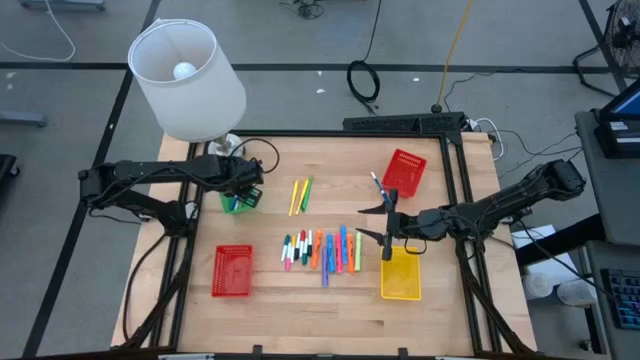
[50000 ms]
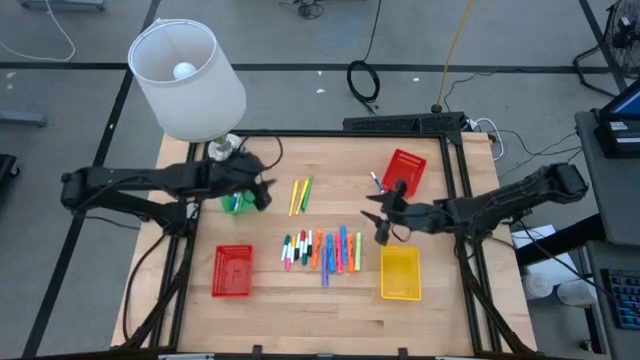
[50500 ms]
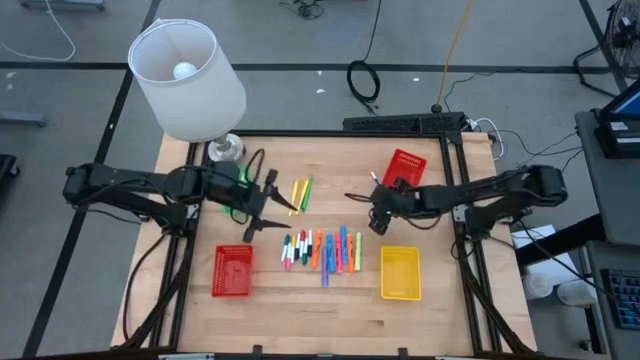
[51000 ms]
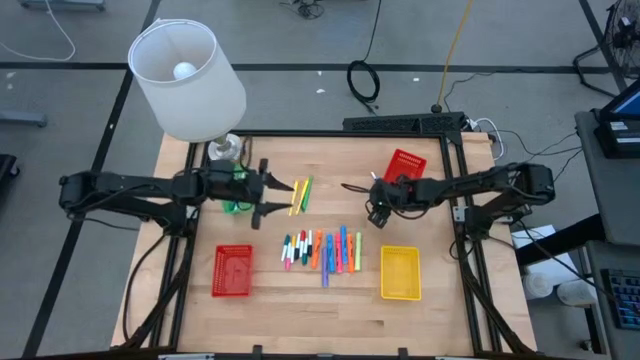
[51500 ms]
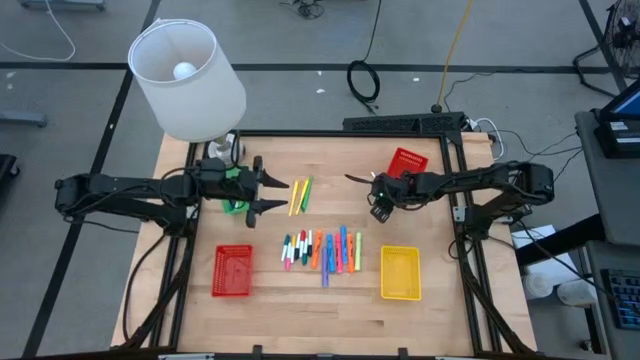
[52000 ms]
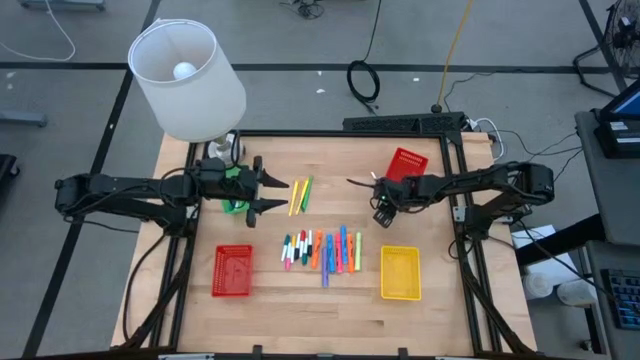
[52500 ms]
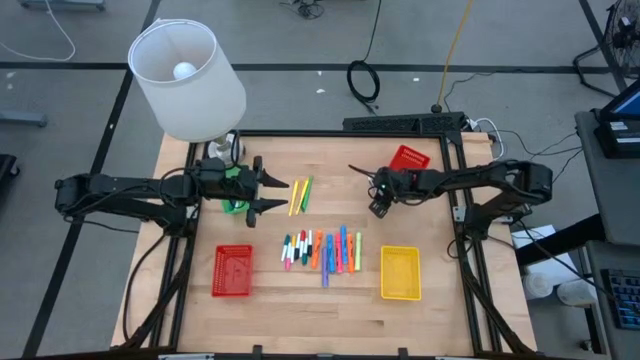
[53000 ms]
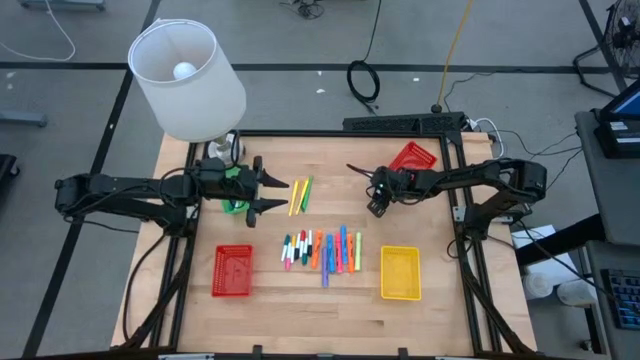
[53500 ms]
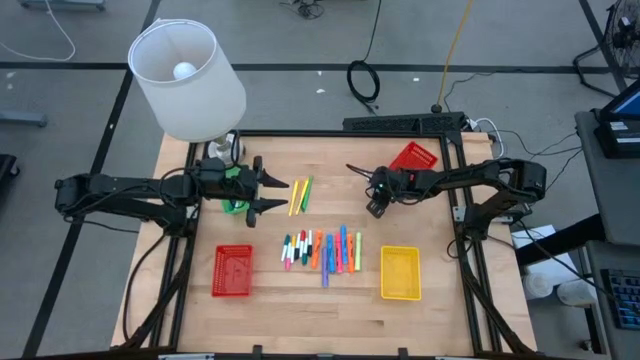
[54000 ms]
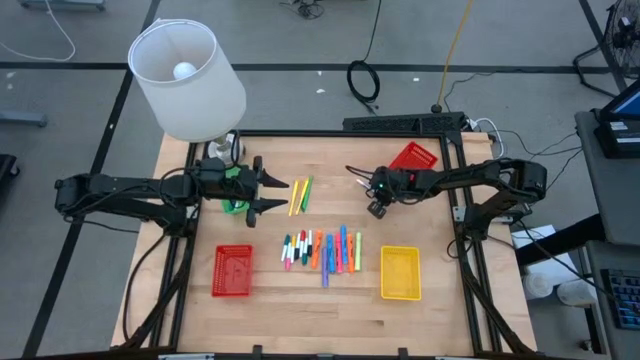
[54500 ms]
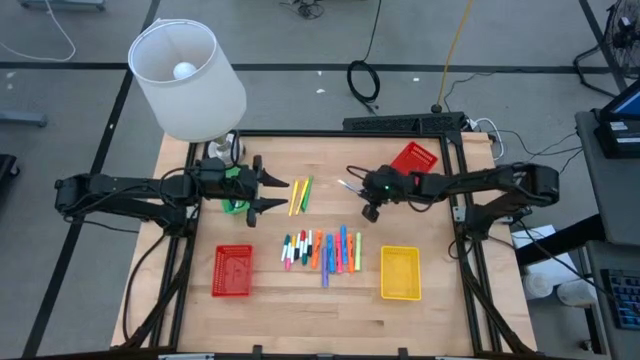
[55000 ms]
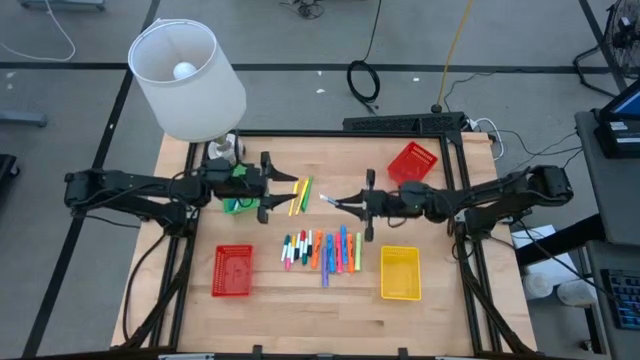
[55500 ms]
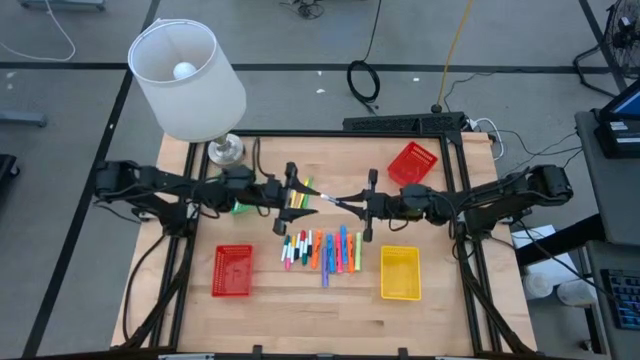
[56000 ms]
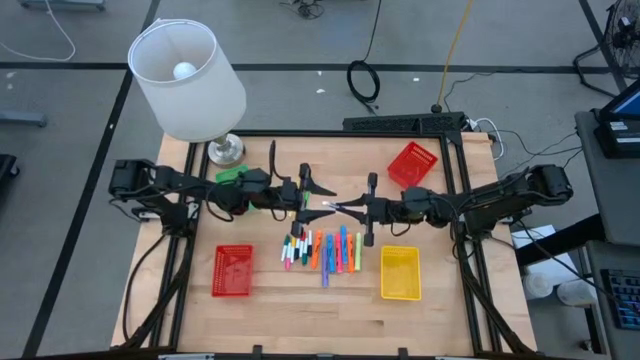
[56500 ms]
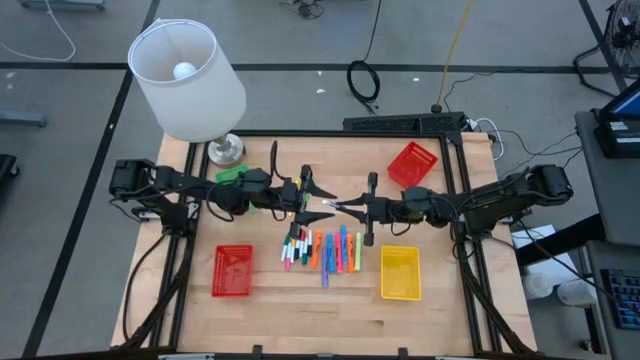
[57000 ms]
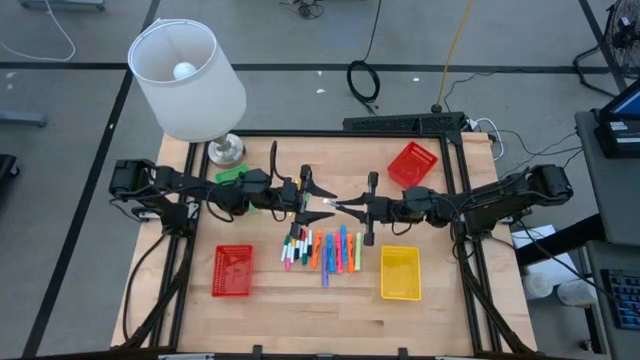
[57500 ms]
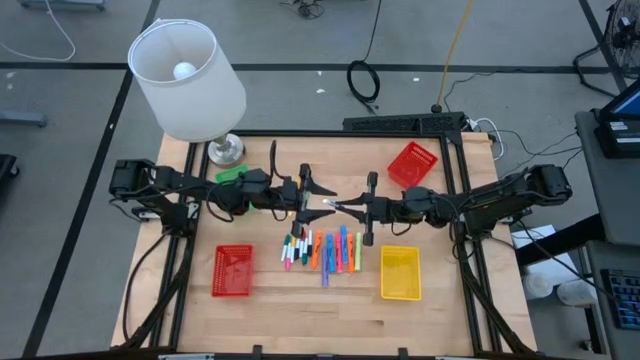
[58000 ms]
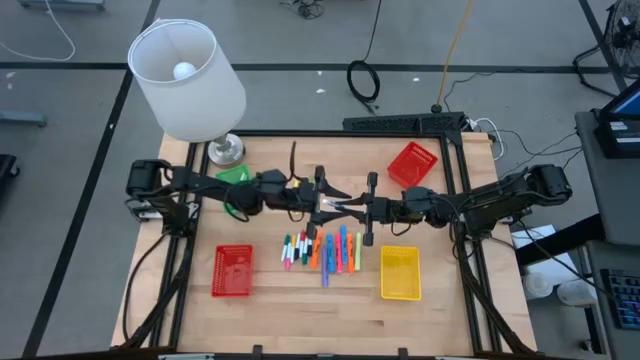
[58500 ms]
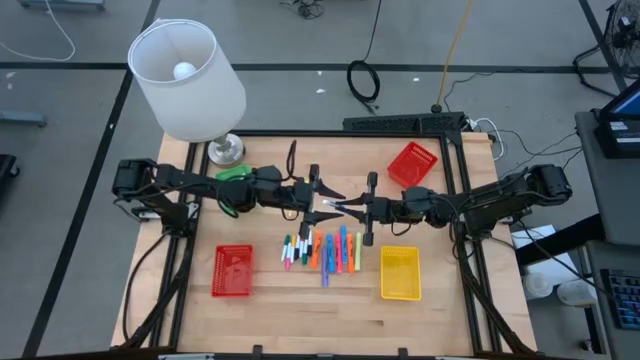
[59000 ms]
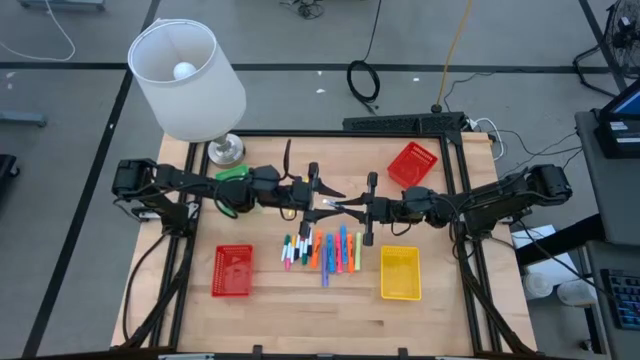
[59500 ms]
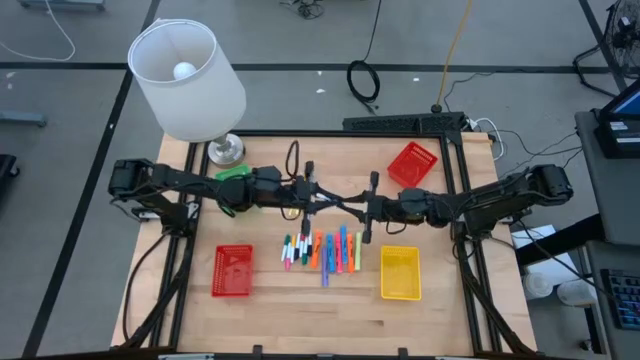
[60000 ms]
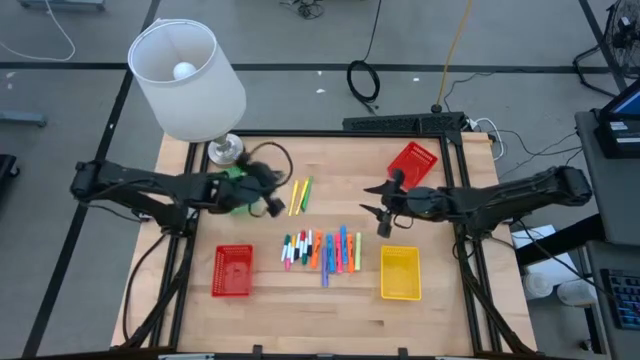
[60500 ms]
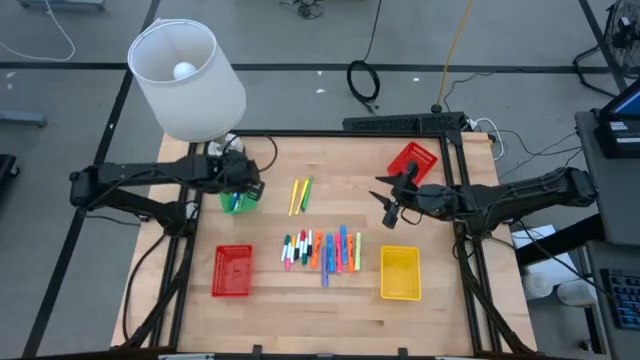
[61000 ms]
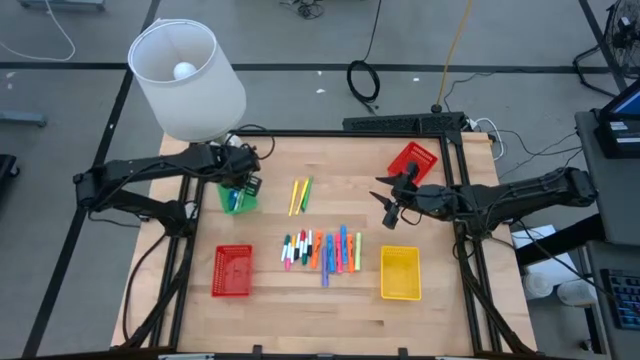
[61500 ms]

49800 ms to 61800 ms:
Task: Pick & Place Markers
Put the blue marker pen into the green basket

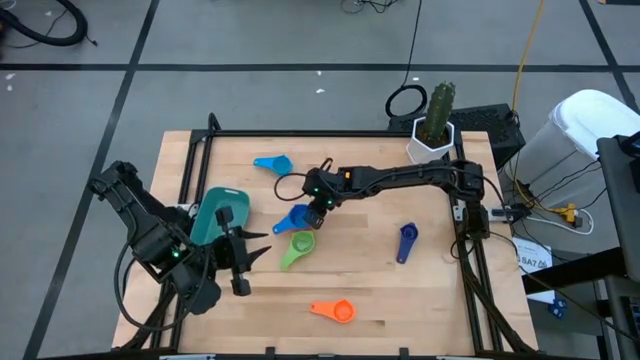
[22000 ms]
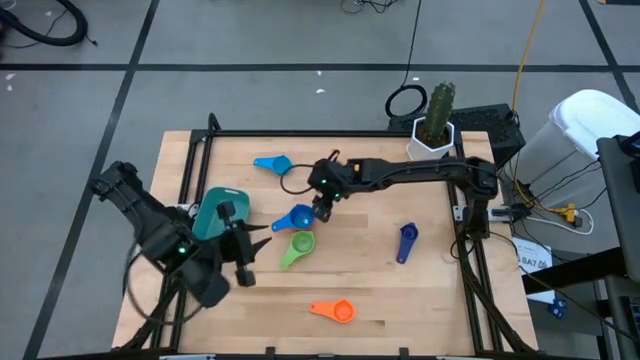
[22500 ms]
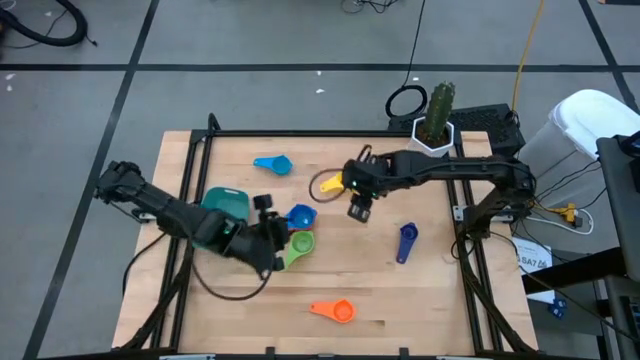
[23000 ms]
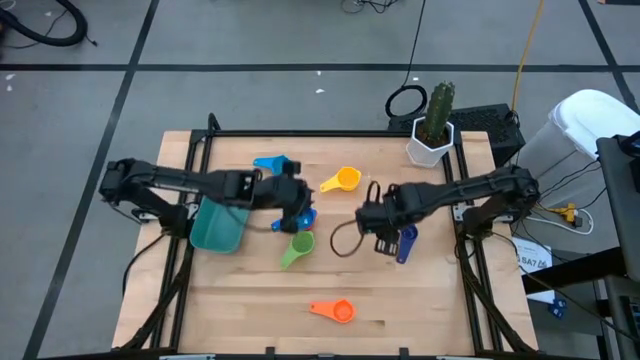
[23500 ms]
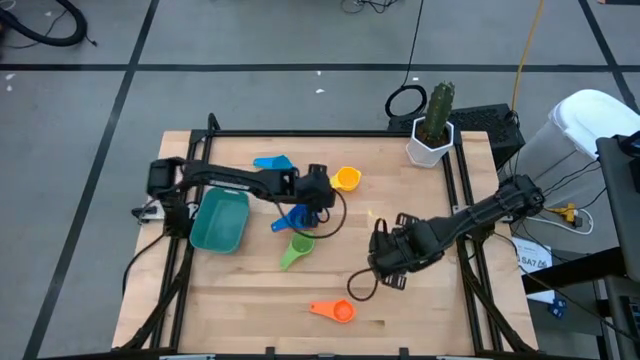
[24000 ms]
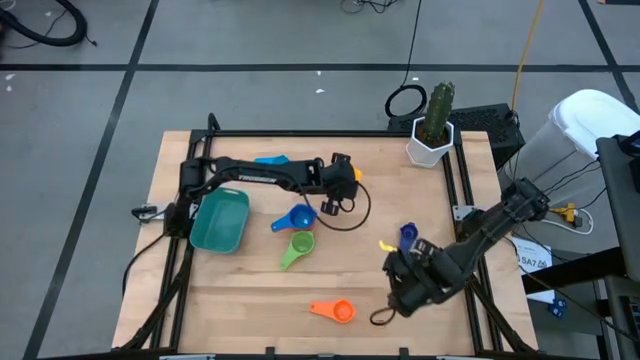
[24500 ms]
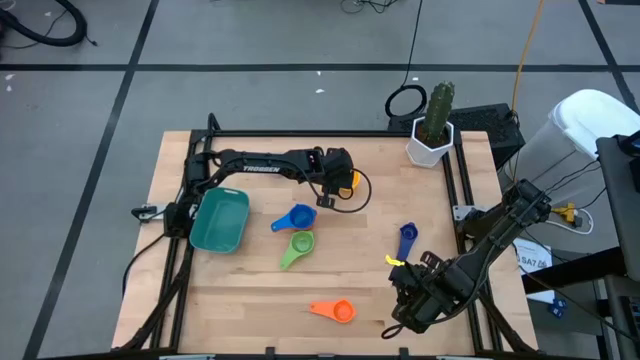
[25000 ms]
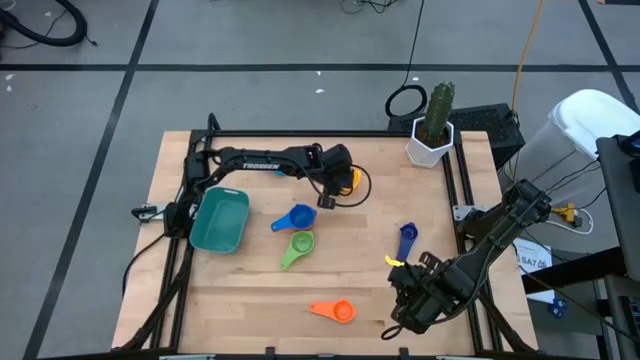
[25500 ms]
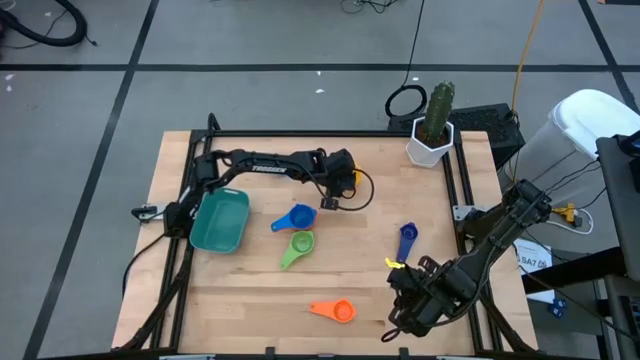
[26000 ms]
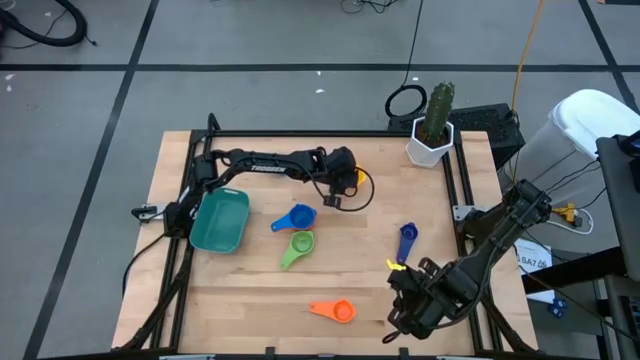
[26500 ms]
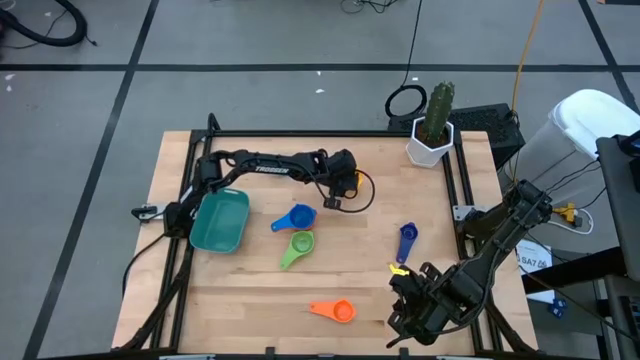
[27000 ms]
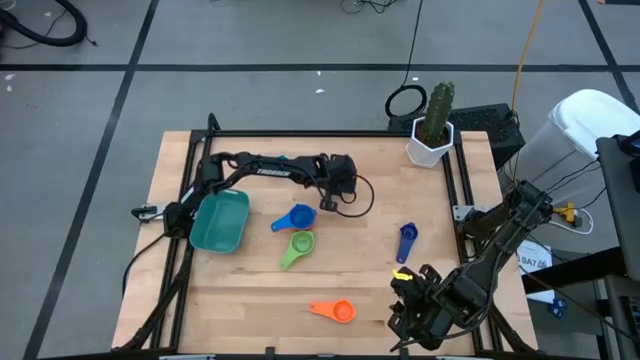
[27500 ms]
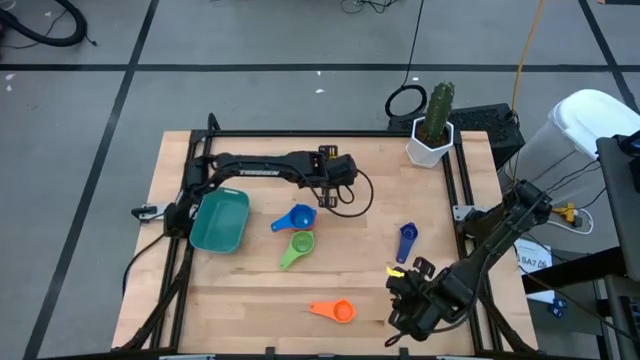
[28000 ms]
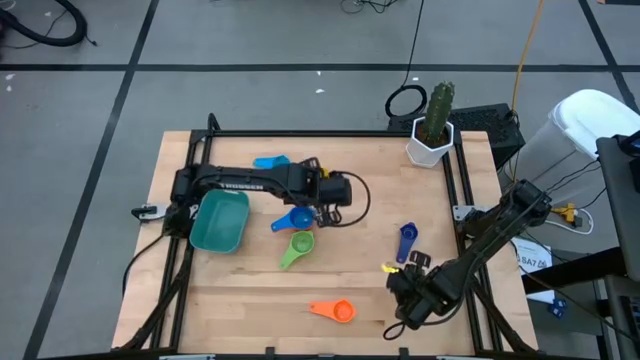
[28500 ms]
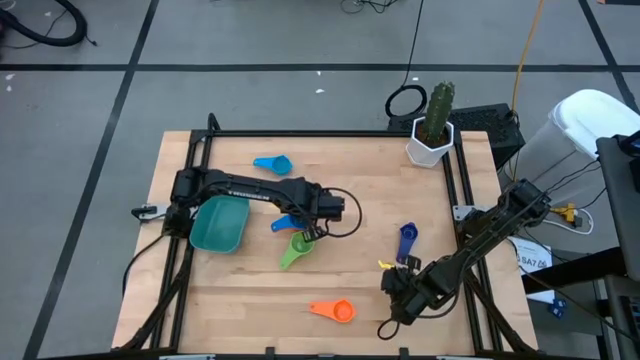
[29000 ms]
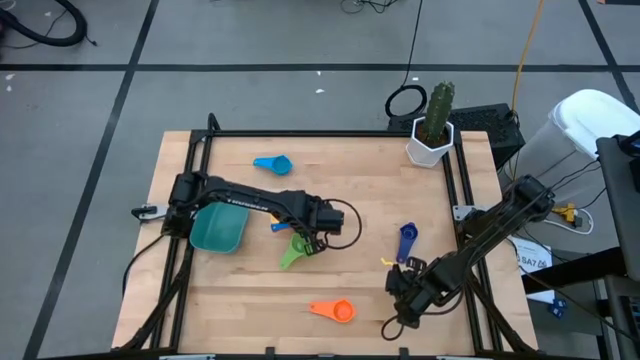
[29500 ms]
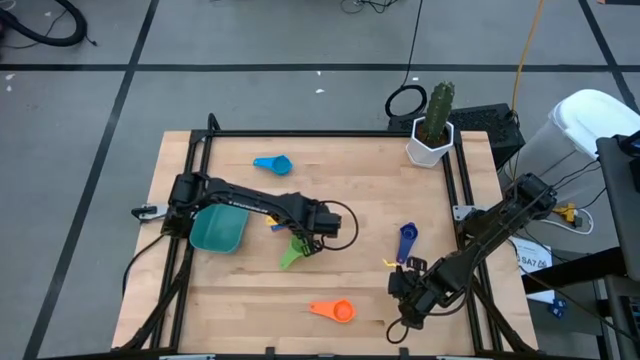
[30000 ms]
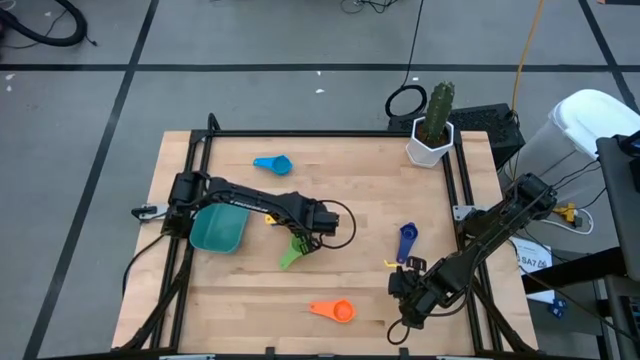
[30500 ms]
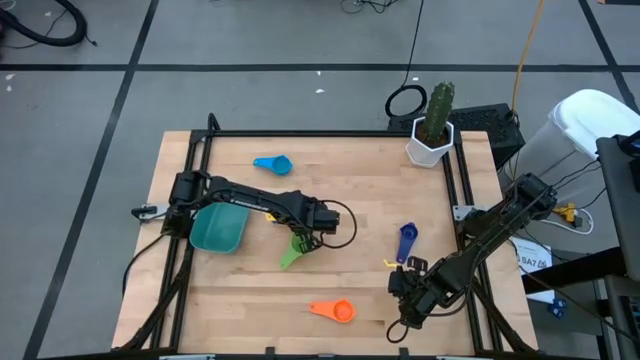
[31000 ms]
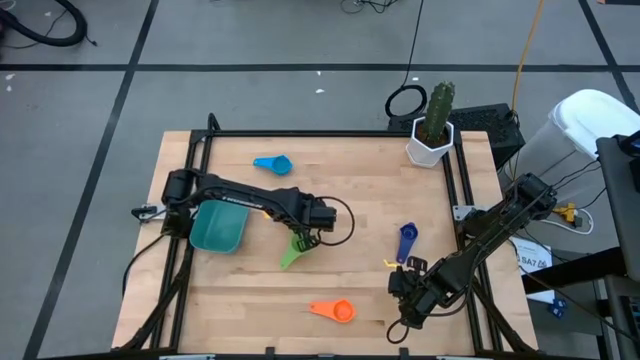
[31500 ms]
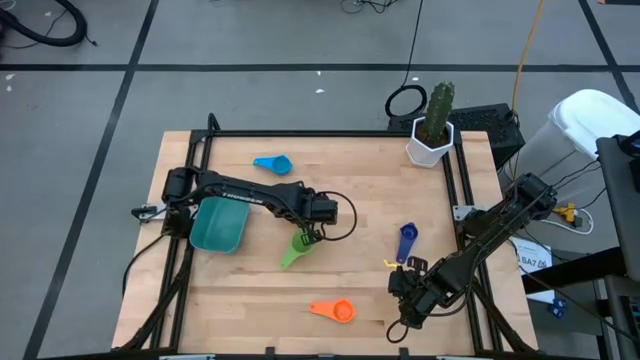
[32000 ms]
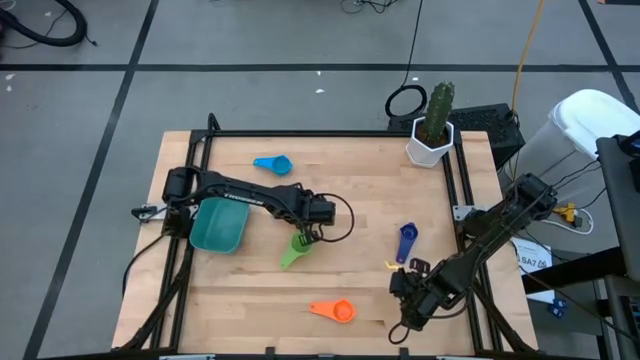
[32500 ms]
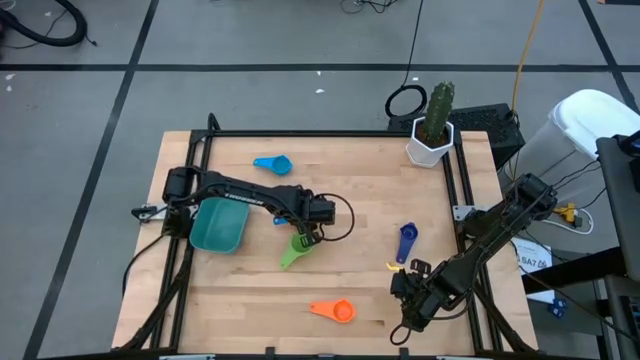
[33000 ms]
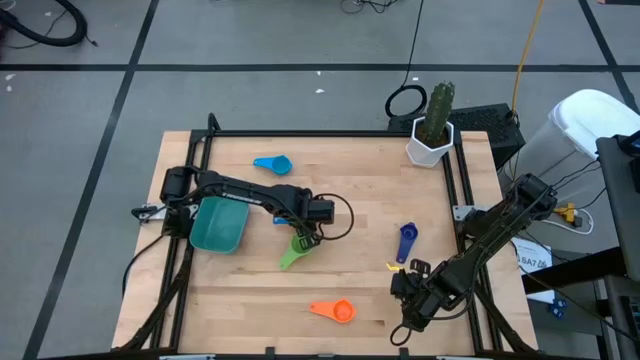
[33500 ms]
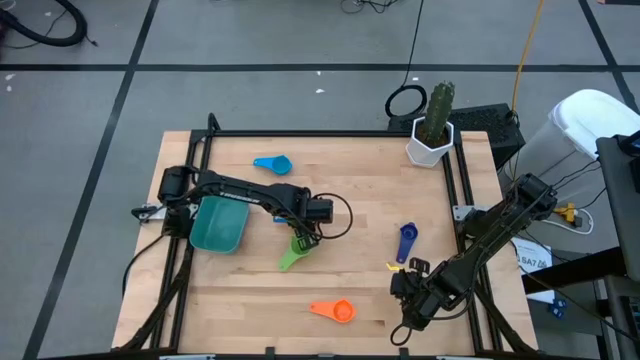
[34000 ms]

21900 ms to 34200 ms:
Task: Nest measuring cups in basket
Stack the yellow measuring cup into the blue measuring cup
